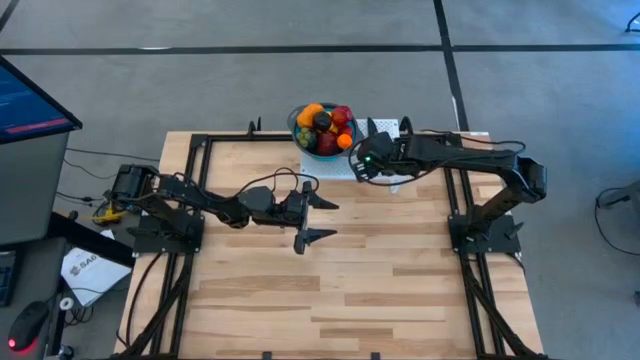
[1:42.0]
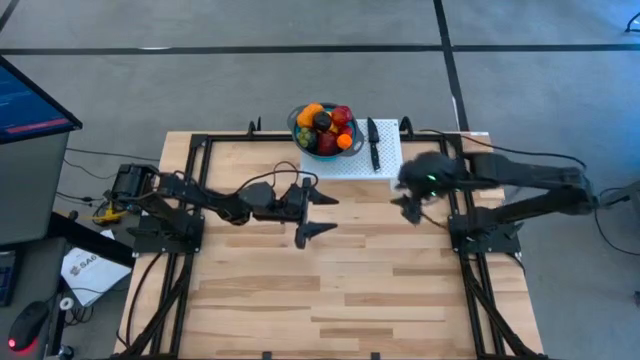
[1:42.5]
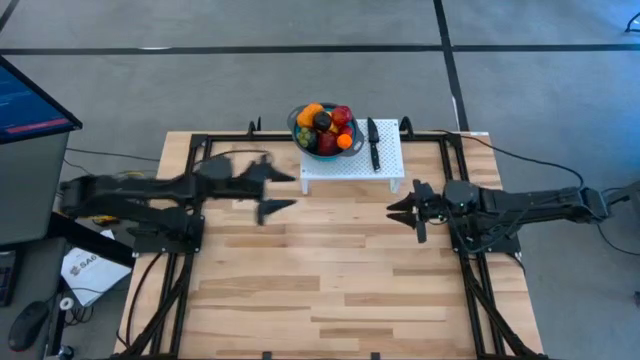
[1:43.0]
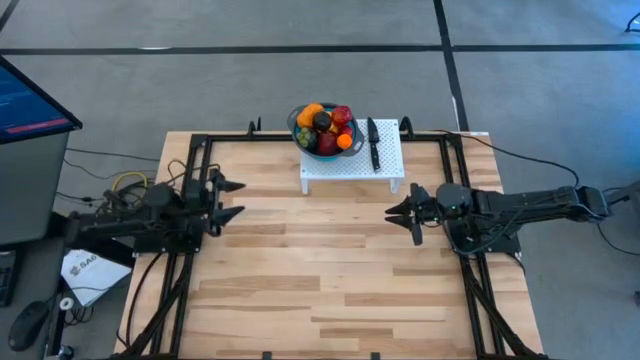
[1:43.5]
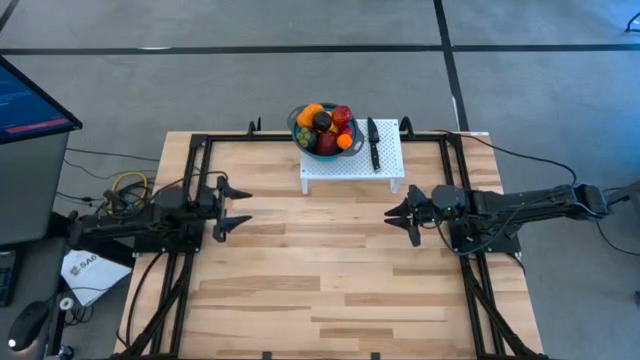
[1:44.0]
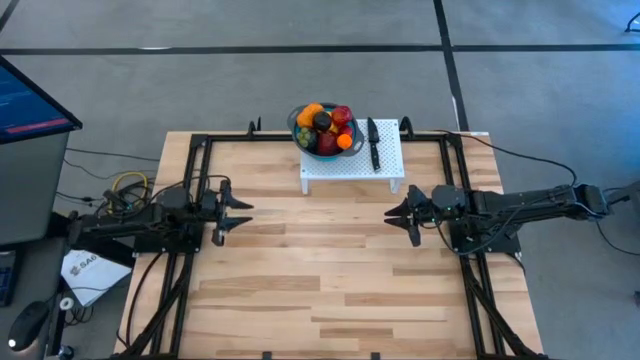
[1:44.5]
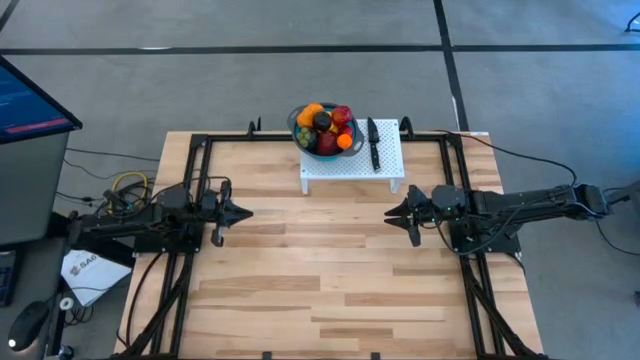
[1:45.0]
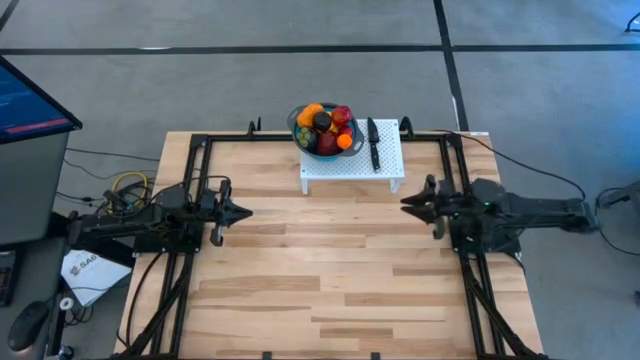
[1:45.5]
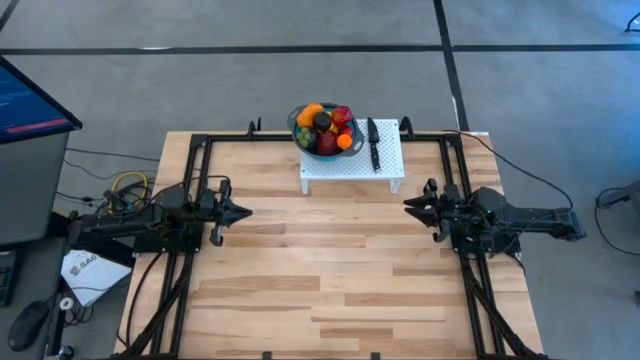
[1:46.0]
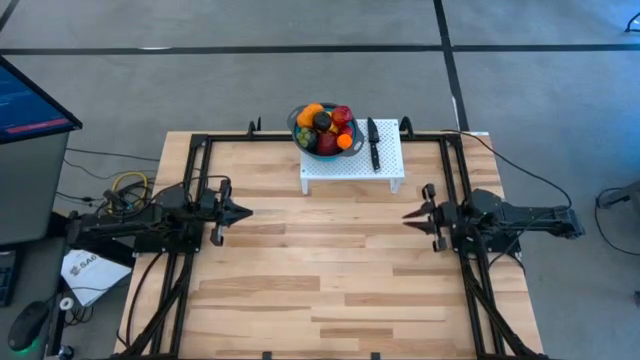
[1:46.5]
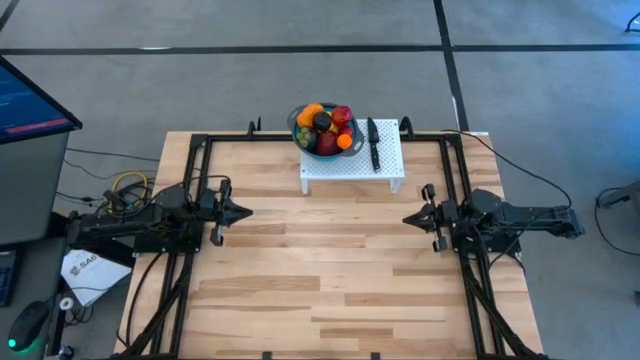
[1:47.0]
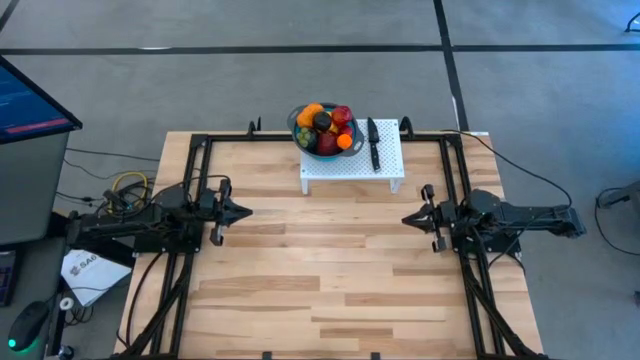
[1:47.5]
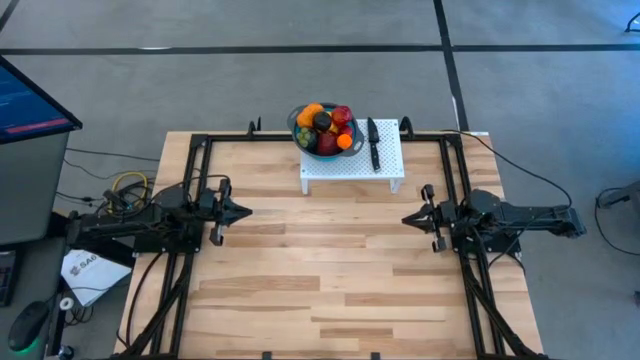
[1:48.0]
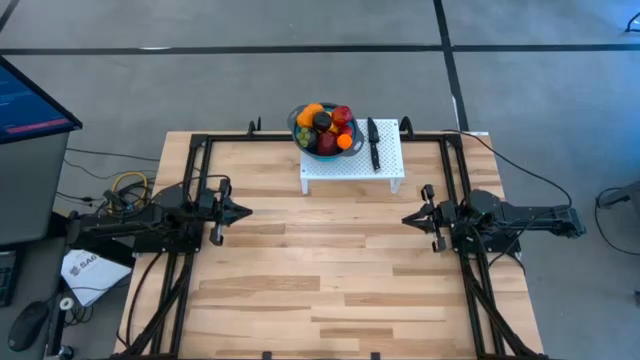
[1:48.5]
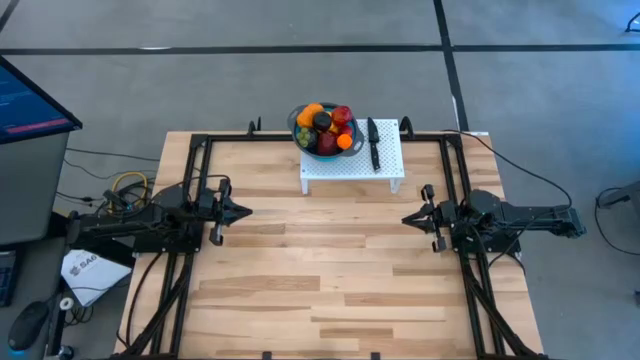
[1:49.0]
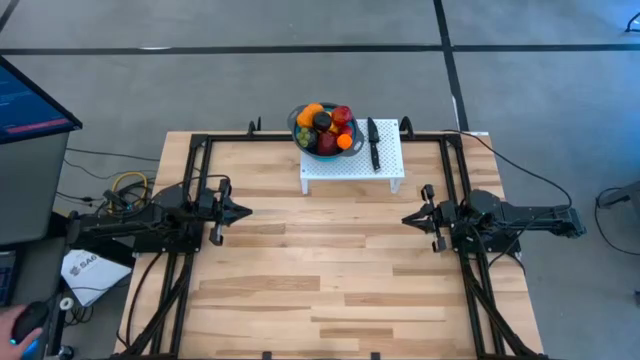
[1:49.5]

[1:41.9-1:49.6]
Task: Pick & Place Fruit
Return to Home Position

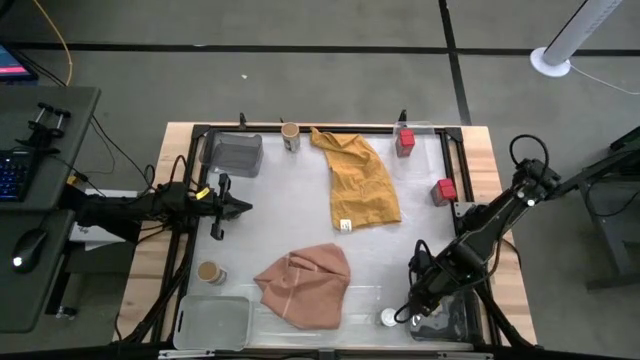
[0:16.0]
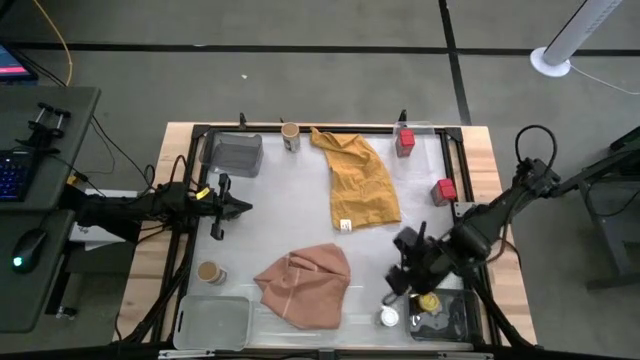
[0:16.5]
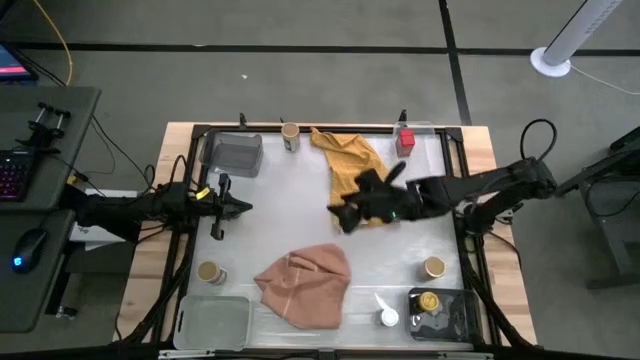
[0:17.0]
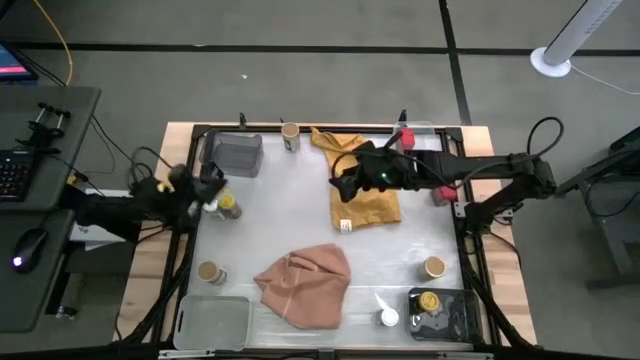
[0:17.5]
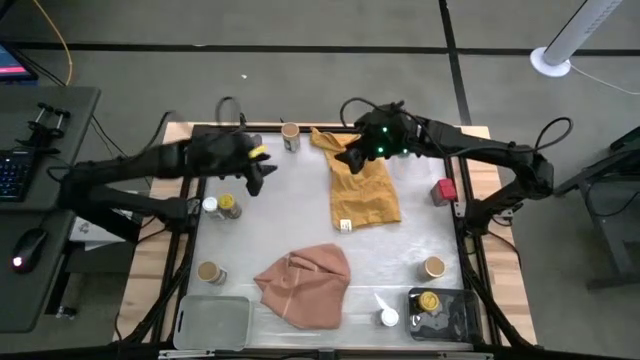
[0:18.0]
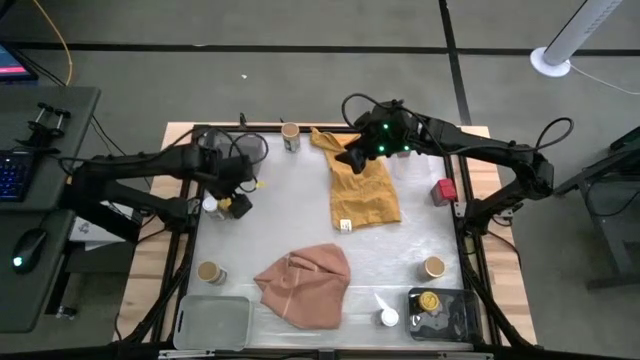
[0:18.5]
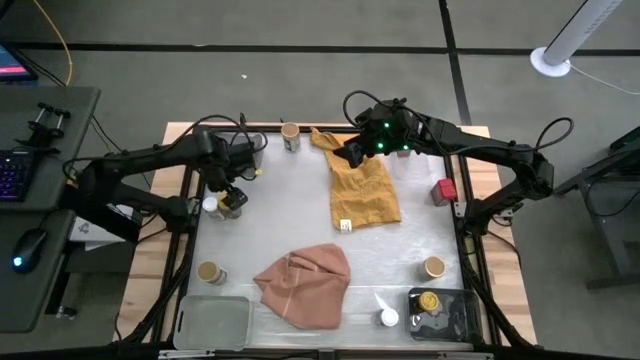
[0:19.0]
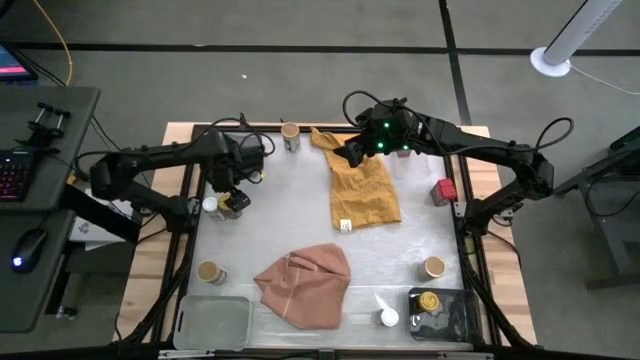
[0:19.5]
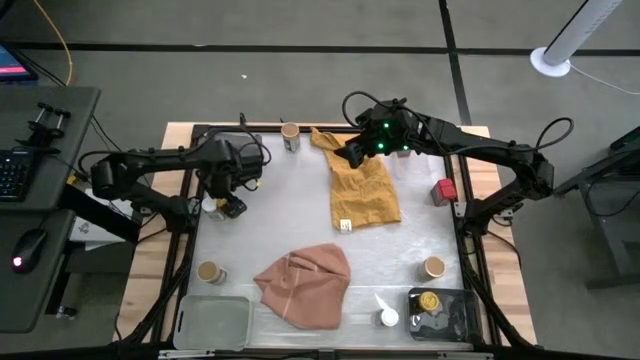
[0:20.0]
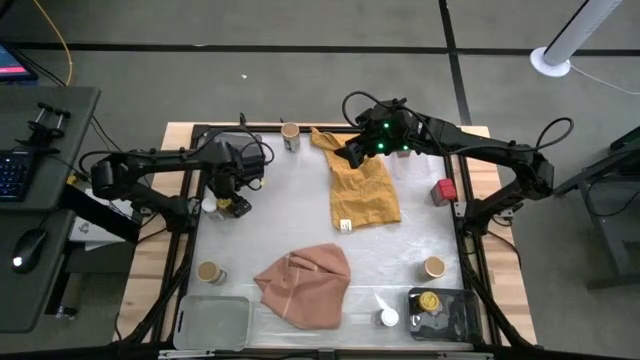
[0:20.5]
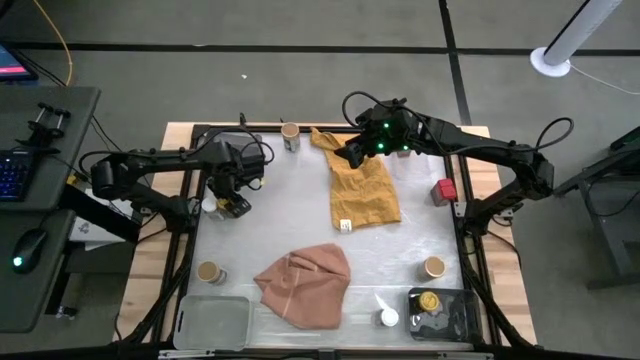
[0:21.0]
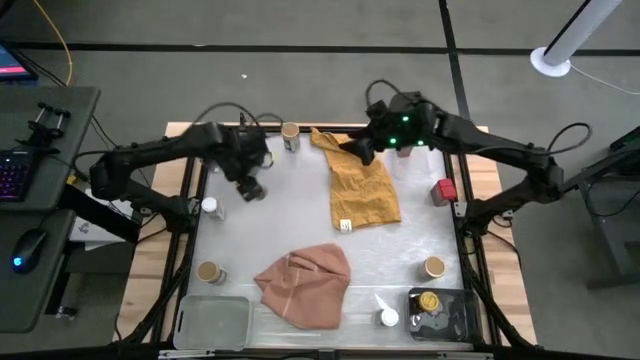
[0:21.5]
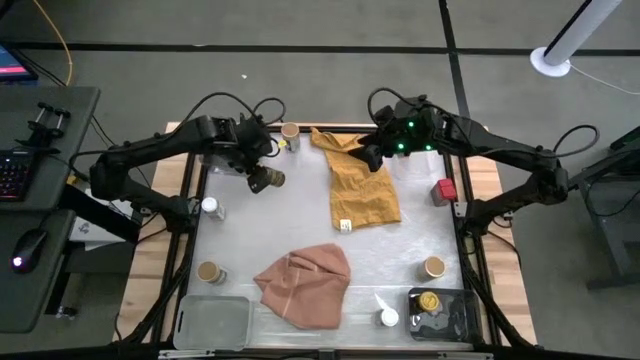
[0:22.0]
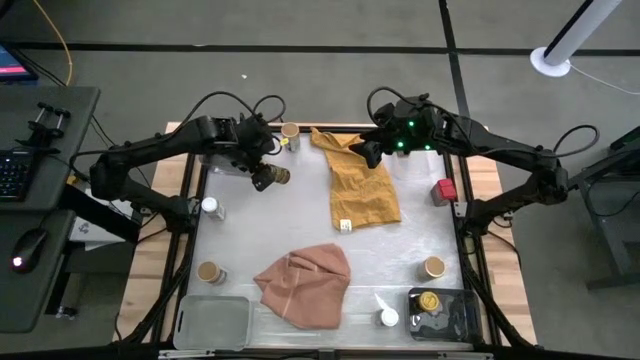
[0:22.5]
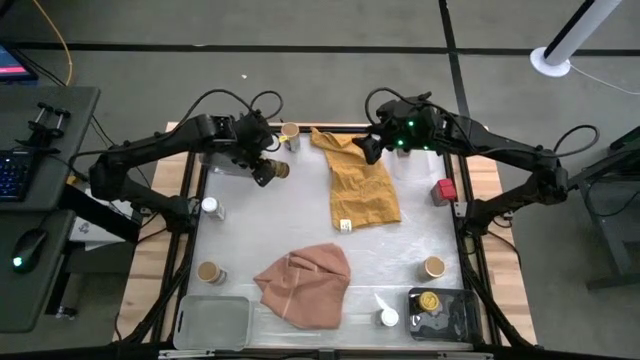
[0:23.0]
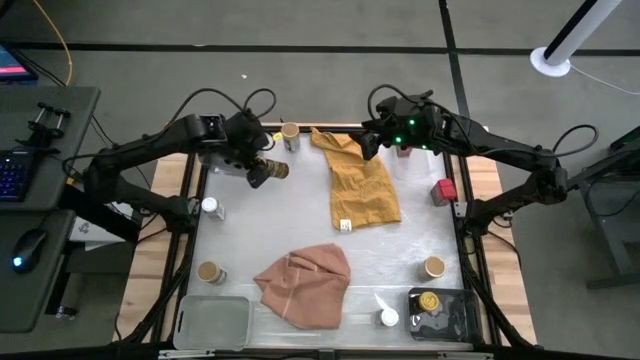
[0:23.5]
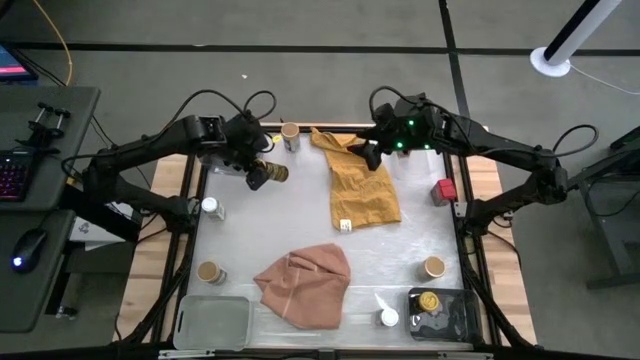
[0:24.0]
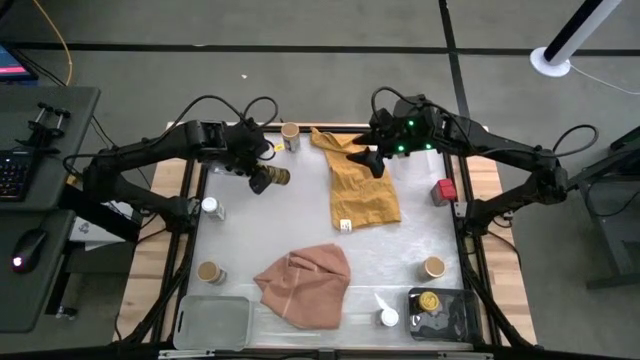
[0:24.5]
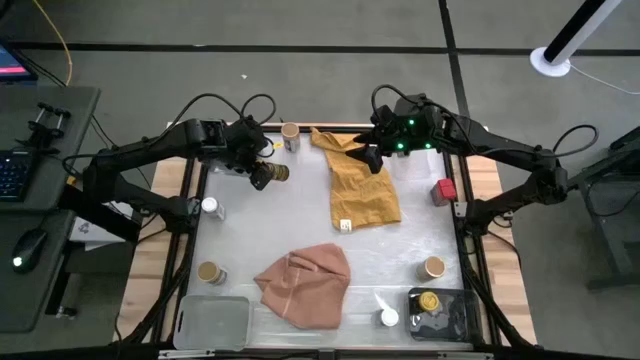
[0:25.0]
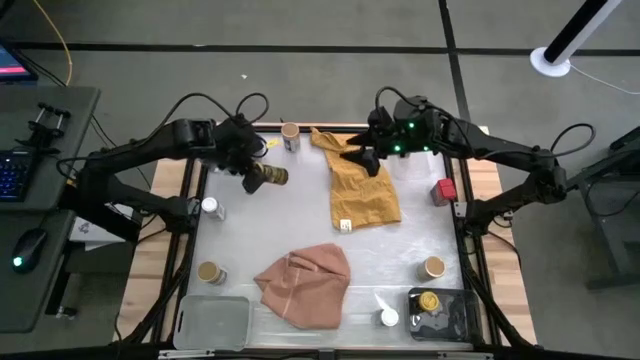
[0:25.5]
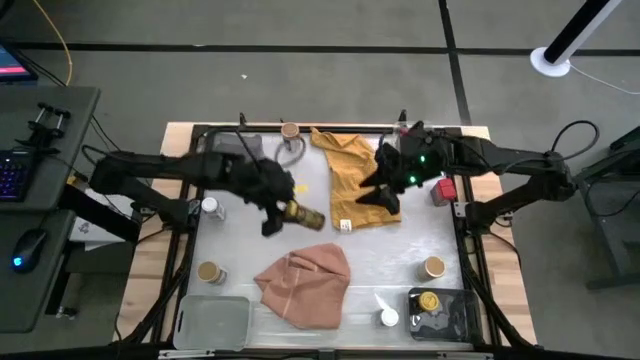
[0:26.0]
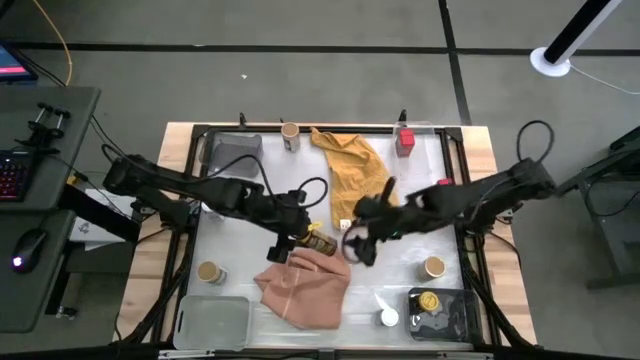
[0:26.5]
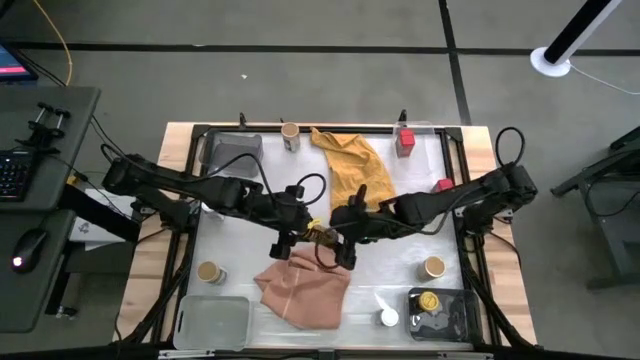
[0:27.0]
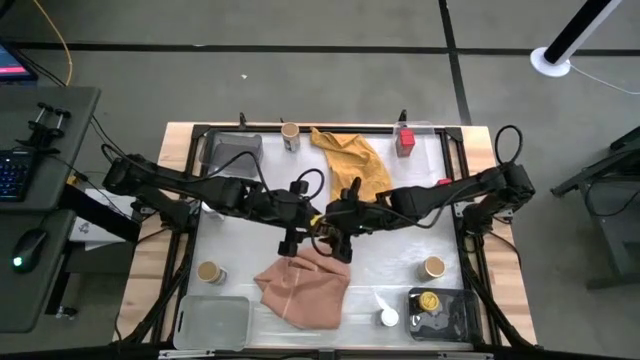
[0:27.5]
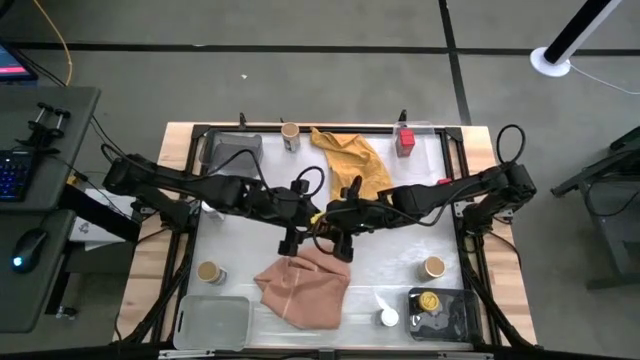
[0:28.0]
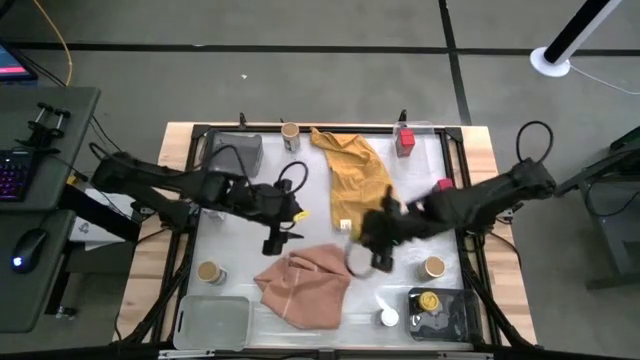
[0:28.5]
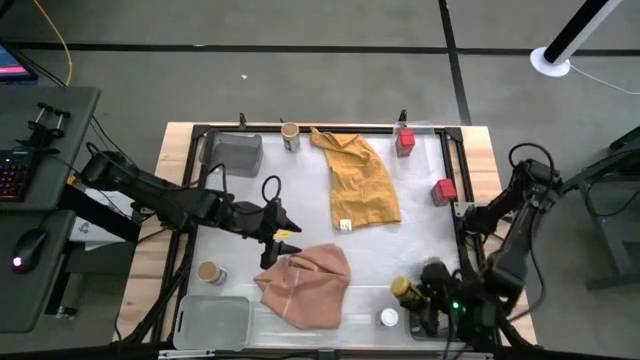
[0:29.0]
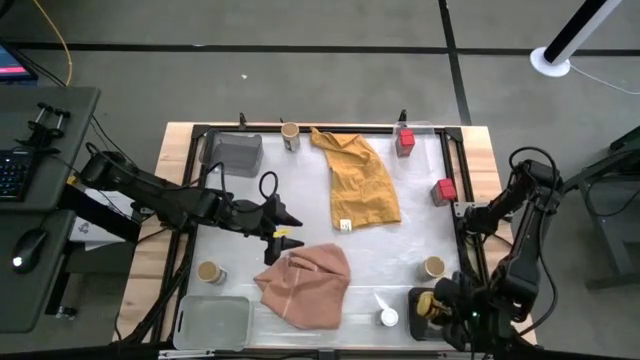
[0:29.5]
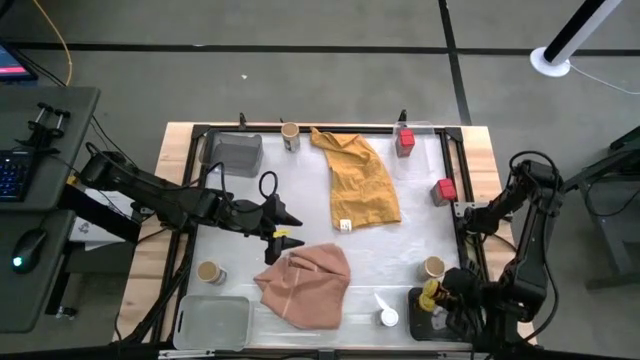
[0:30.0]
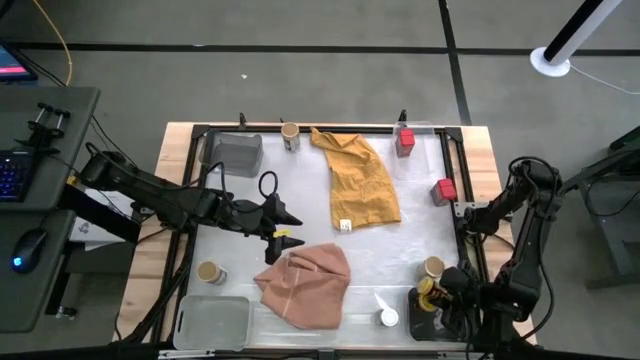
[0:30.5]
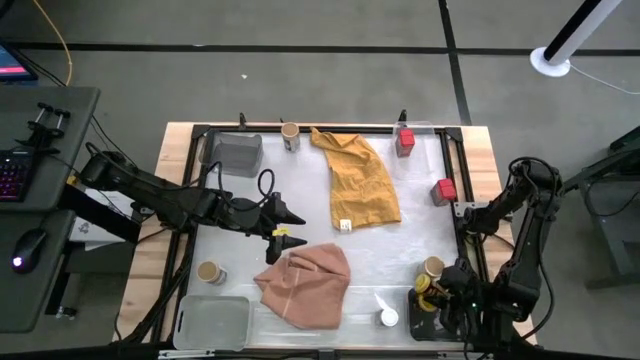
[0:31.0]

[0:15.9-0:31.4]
Task: Sort spices by type
Put the yellow seasoning bottle into the bottom right black bin
